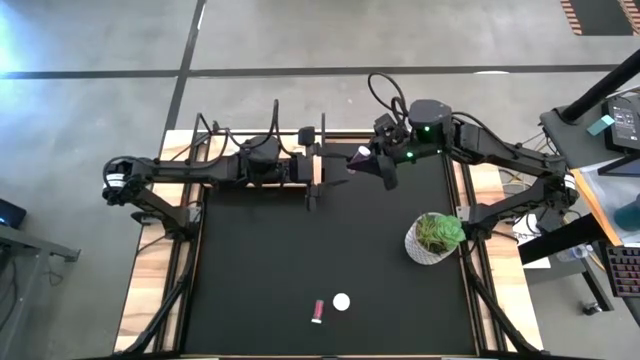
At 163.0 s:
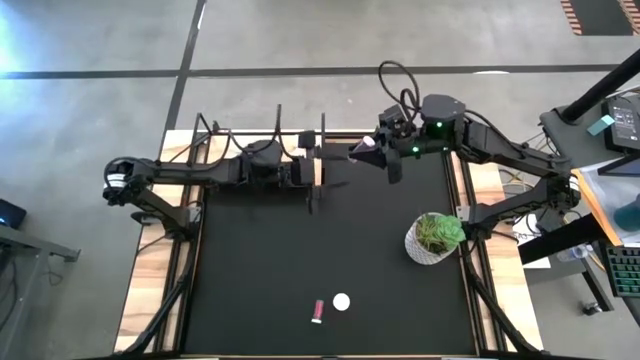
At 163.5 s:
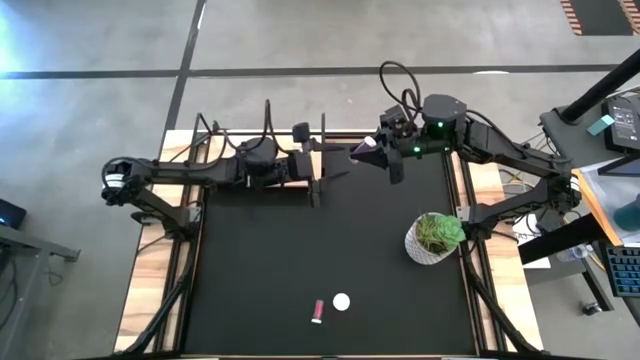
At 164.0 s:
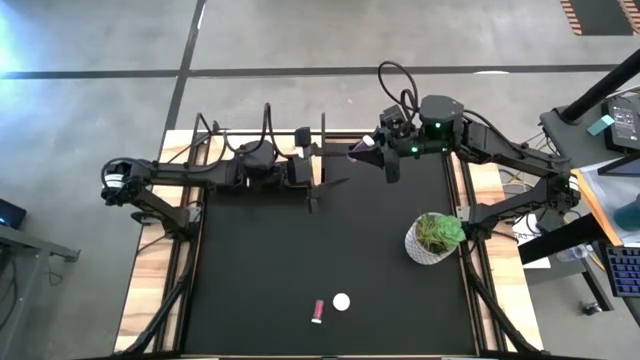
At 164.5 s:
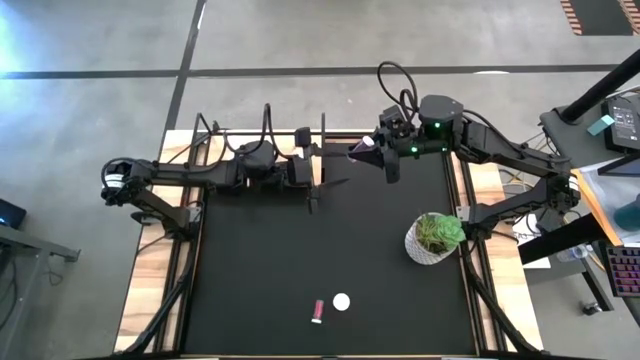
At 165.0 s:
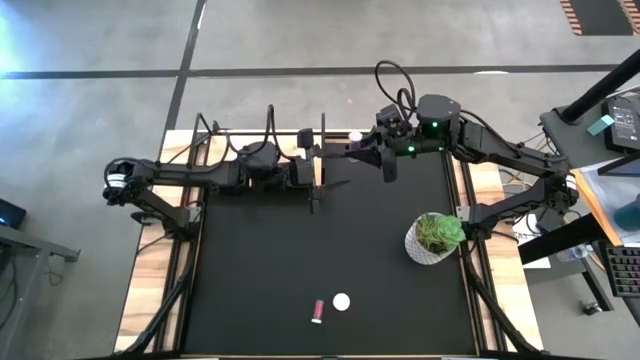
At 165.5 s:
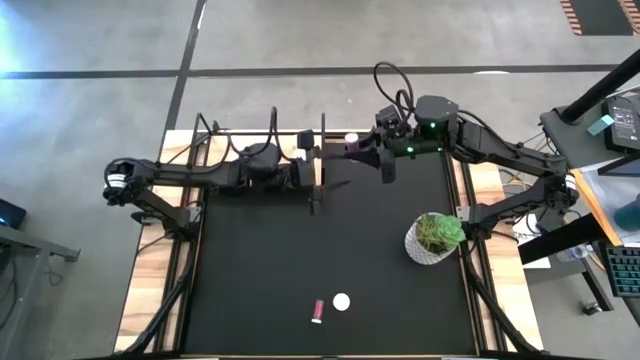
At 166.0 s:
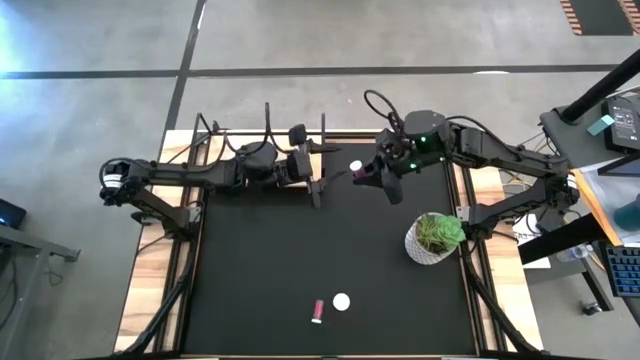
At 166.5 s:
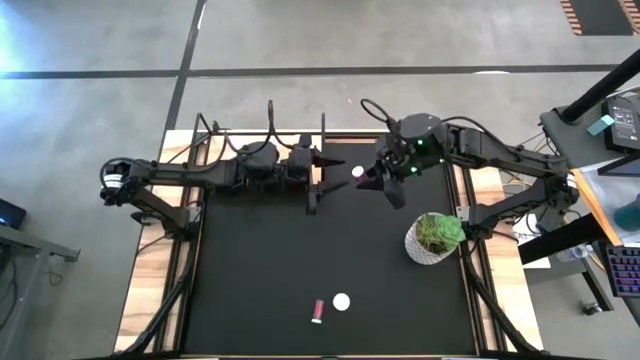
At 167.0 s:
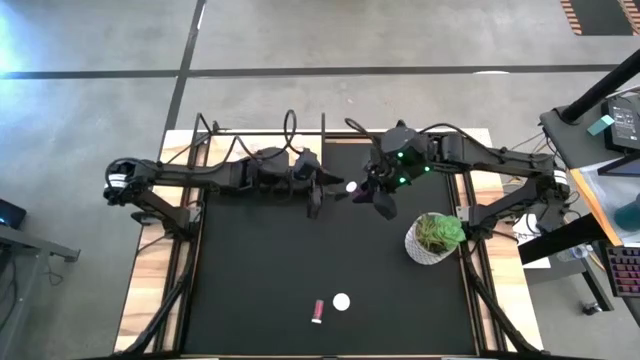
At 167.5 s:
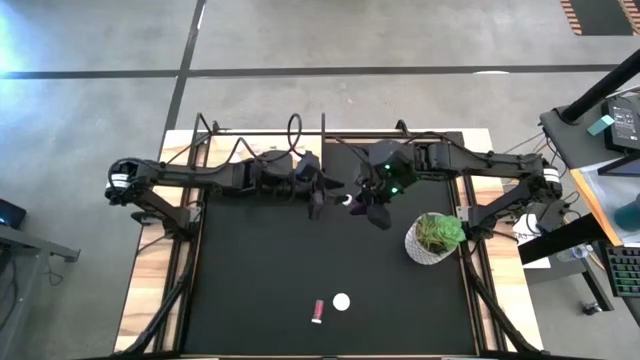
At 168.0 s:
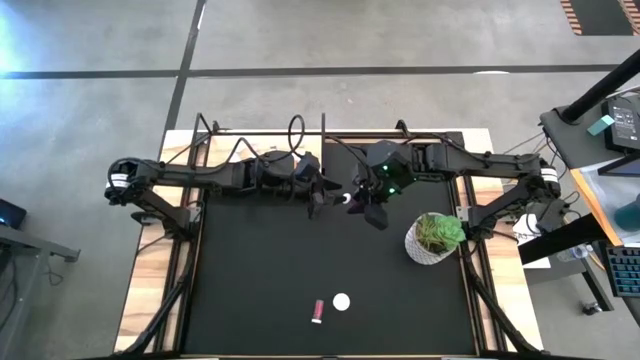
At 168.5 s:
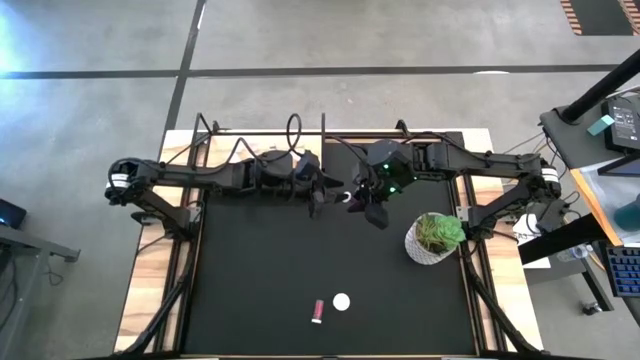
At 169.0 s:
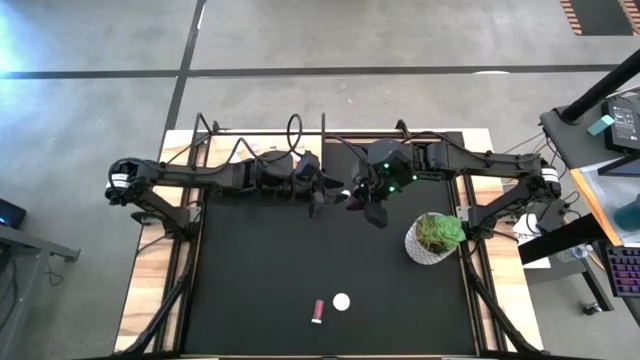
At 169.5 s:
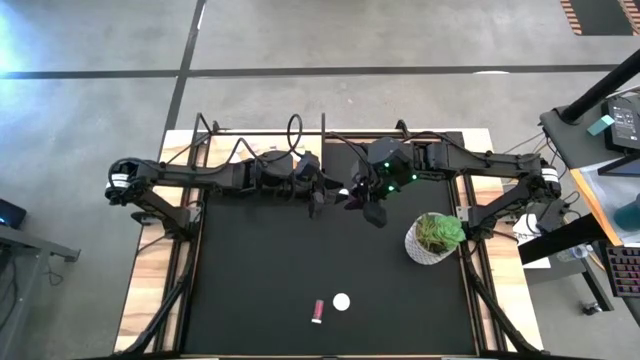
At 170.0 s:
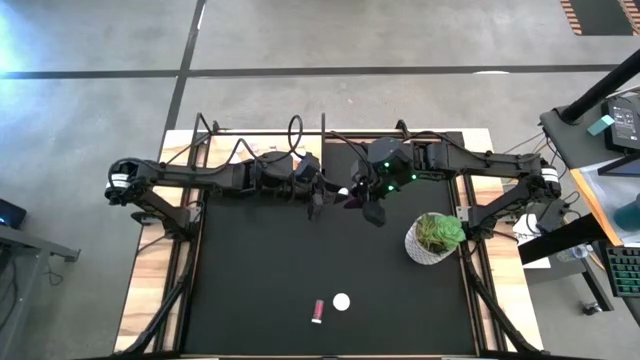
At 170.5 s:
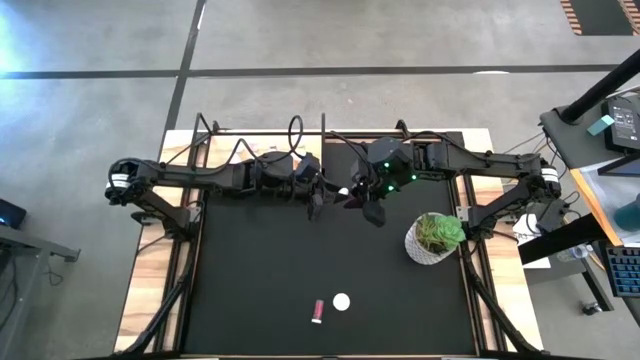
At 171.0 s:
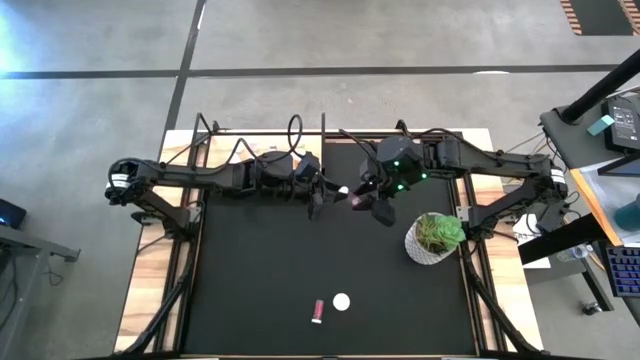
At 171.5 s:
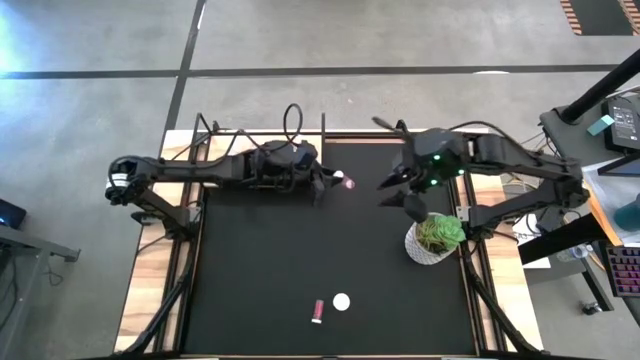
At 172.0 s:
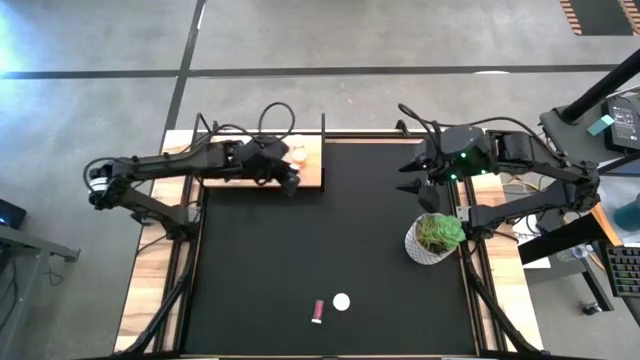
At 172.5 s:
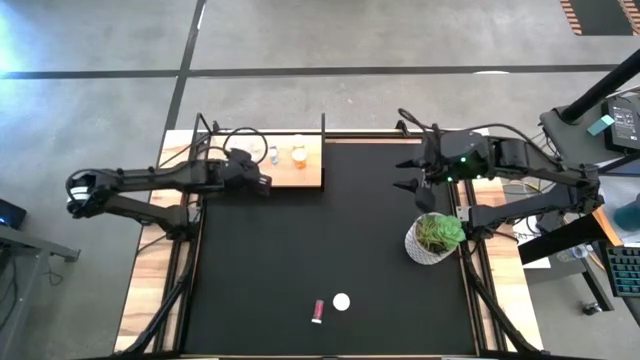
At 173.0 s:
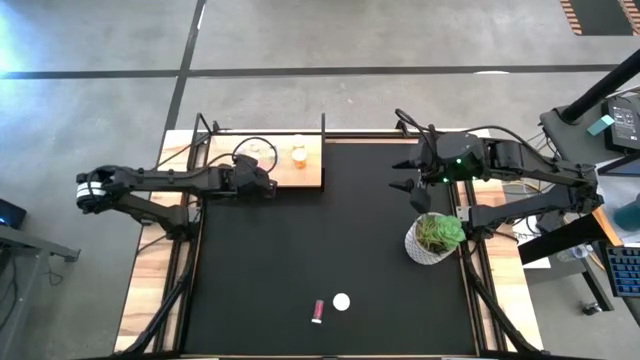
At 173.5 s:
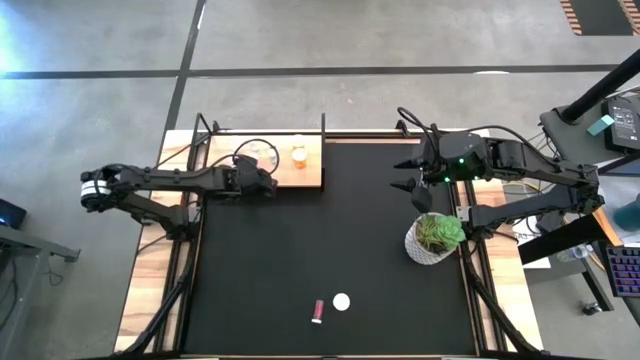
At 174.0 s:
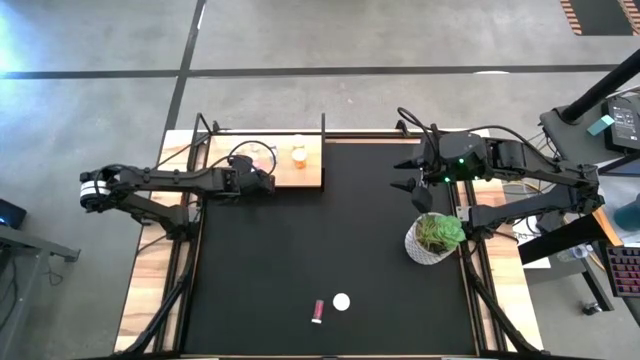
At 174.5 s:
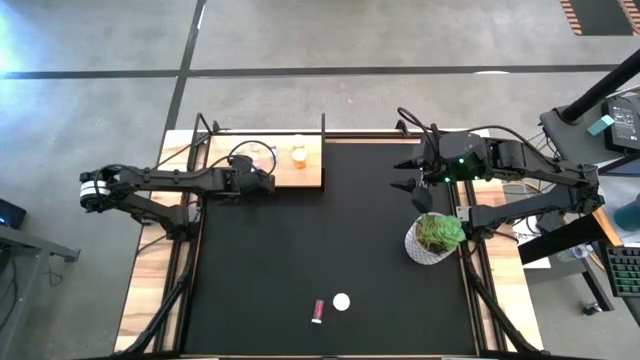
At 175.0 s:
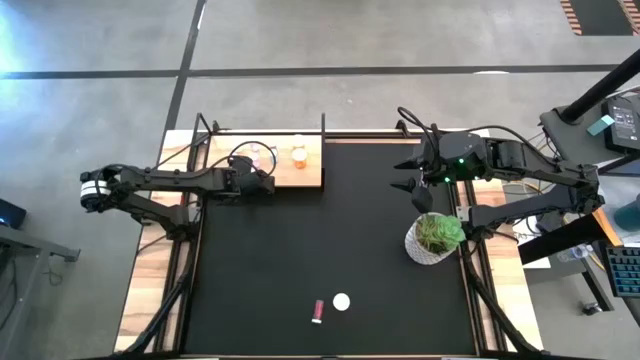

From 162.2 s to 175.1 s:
Task: Pick and place medicine bottles onto shelf by color
Put the pink pill bottle into the shelf

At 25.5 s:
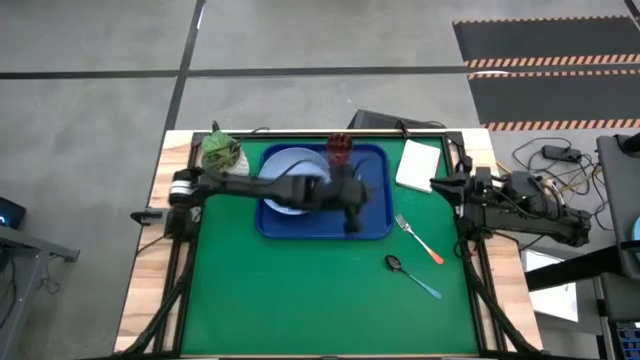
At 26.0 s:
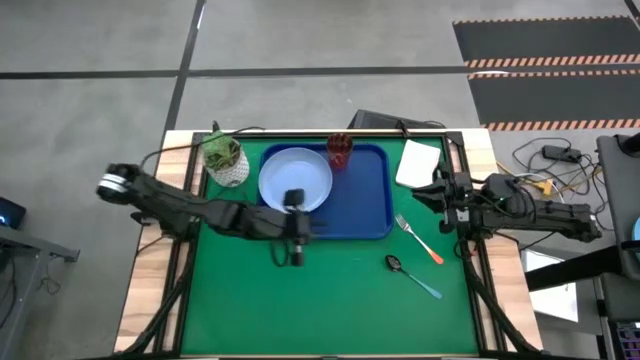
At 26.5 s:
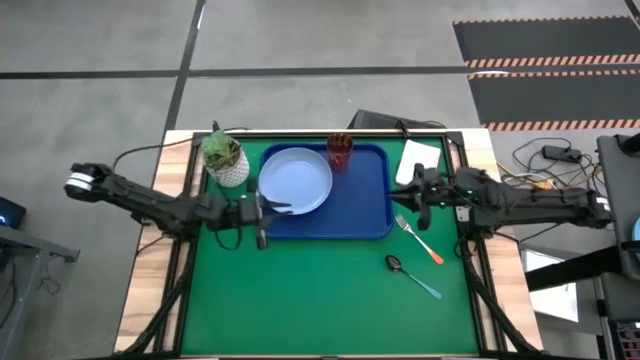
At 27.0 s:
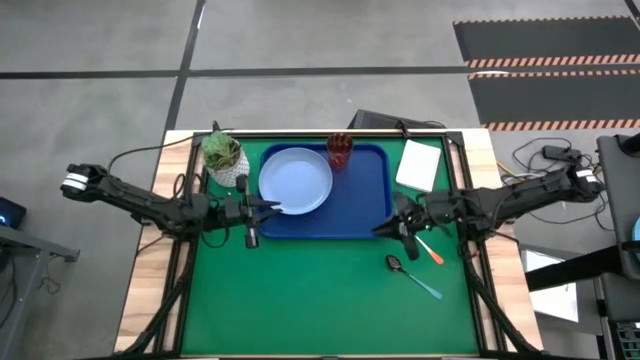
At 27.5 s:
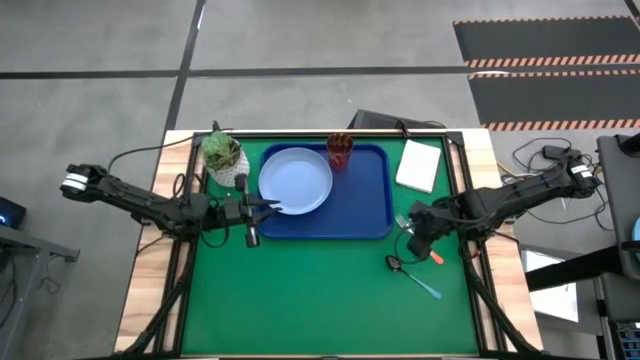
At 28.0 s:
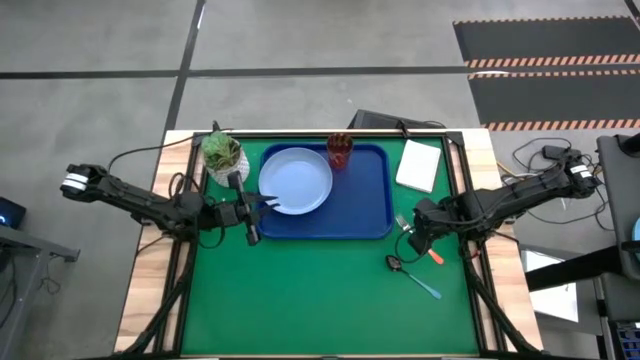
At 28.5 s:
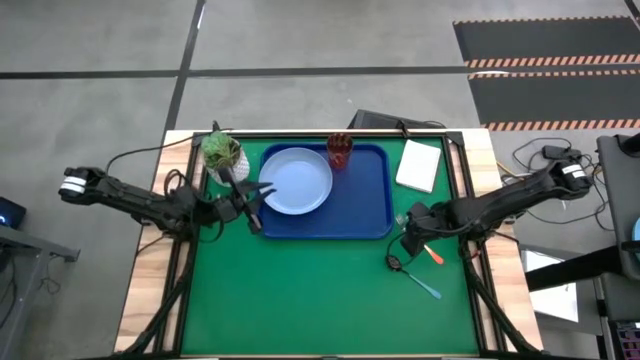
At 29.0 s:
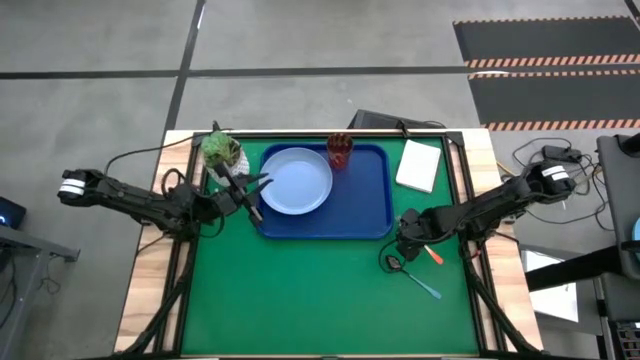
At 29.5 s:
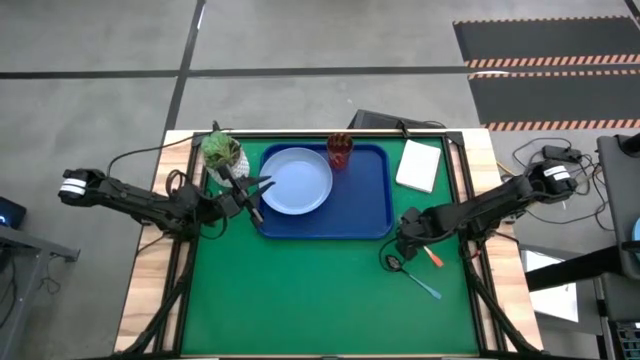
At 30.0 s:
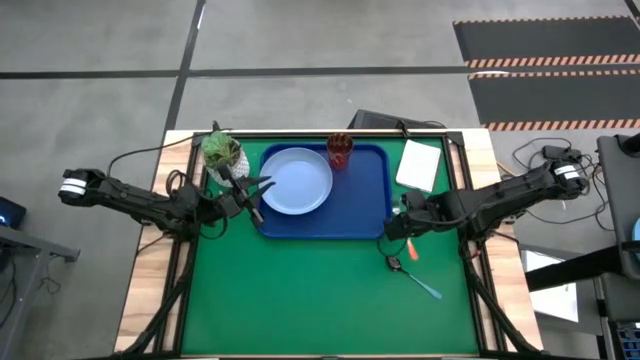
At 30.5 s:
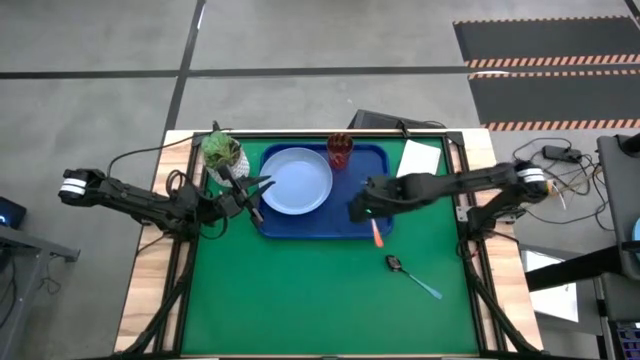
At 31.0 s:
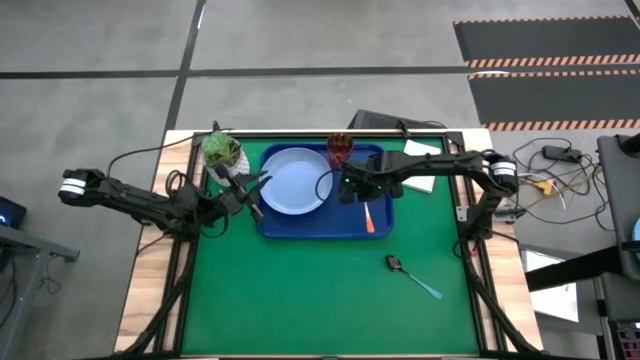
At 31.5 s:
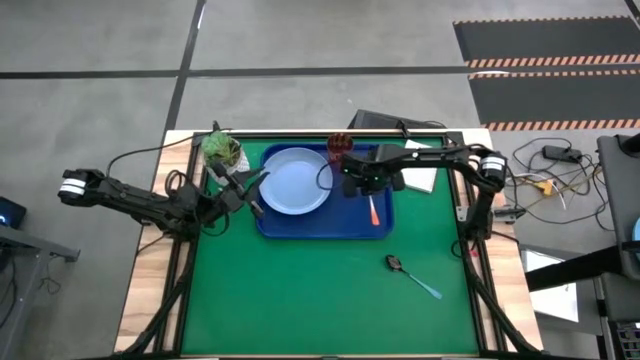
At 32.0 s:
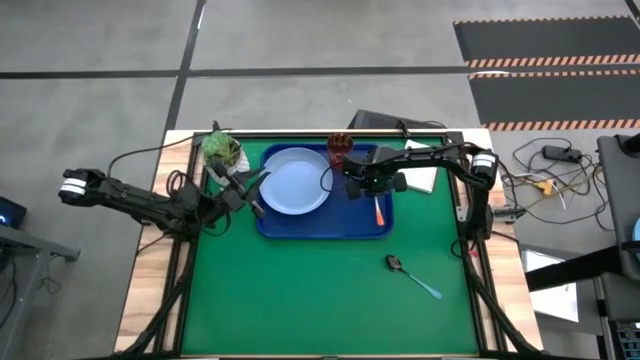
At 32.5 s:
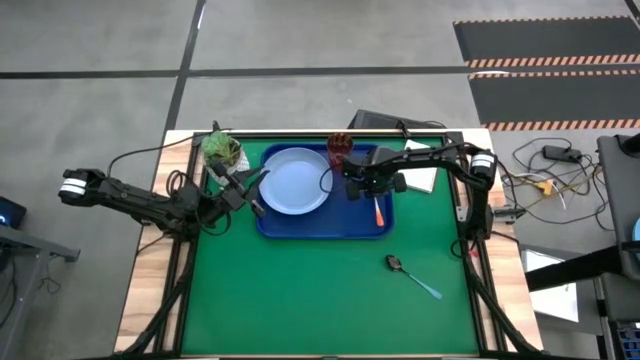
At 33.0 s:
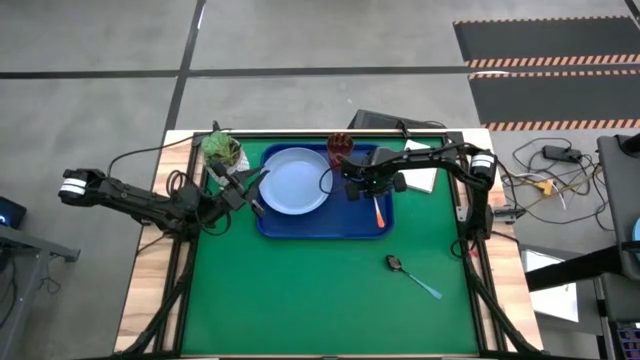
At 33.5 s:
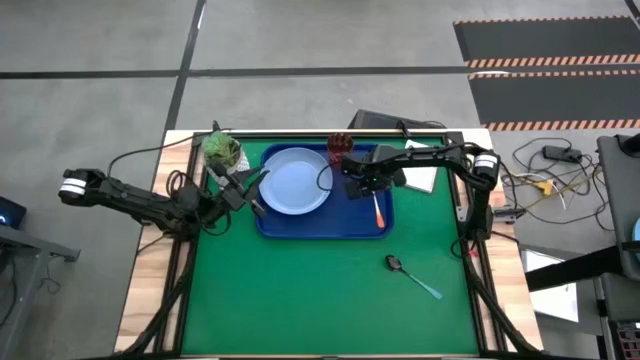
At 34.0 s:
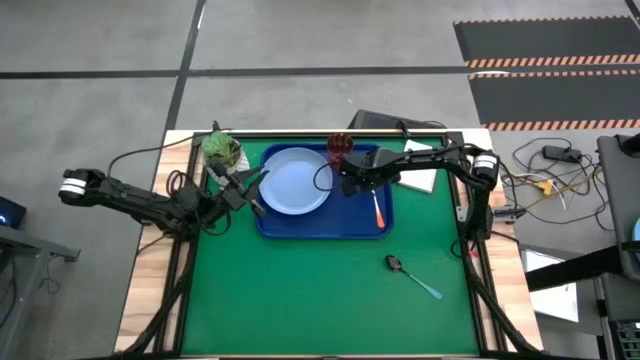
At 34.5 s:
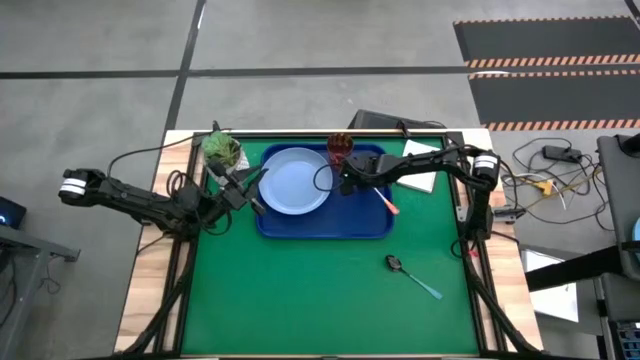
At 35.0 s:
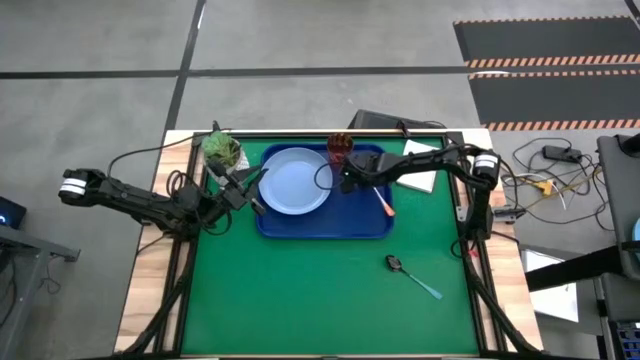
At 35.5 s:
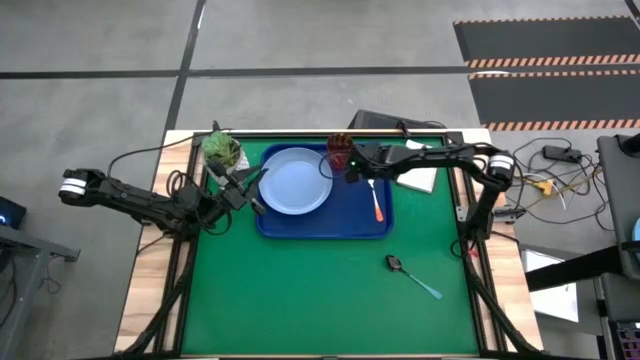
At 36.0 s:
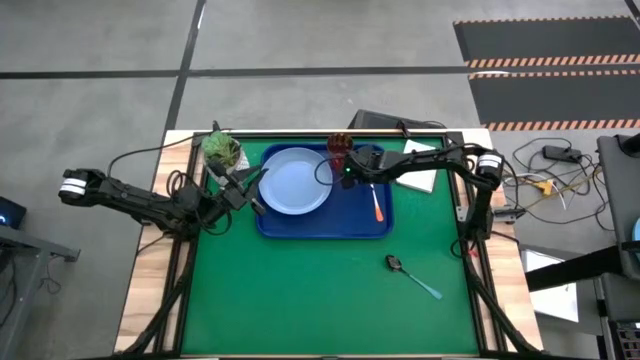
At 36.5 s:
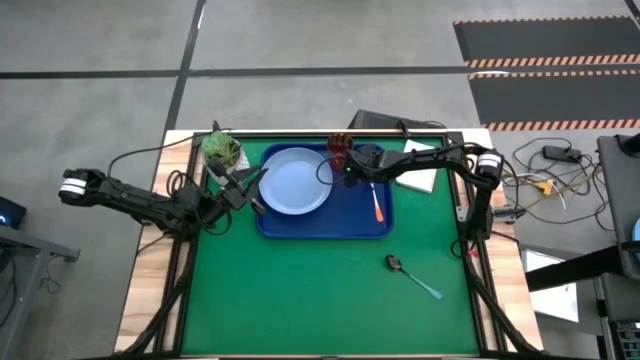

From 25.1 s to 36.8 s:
Task: Pick and place plate/cup/fork/spoon on tray
Put the orange fork on the blue tray to the right of the blue plate
